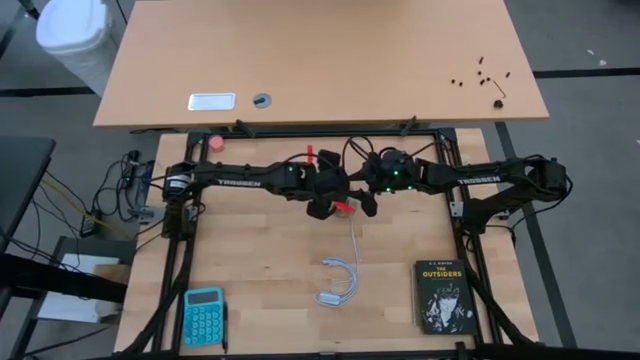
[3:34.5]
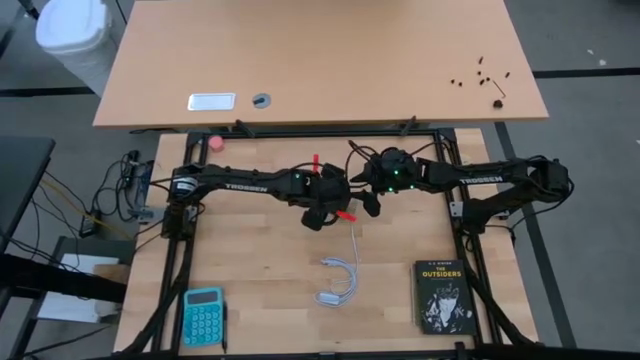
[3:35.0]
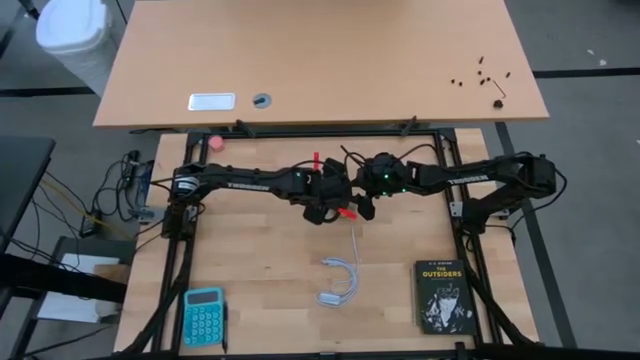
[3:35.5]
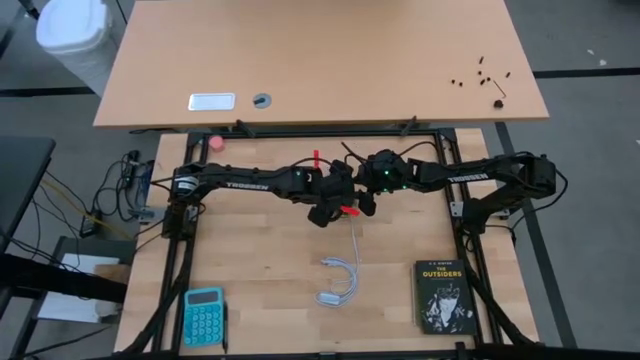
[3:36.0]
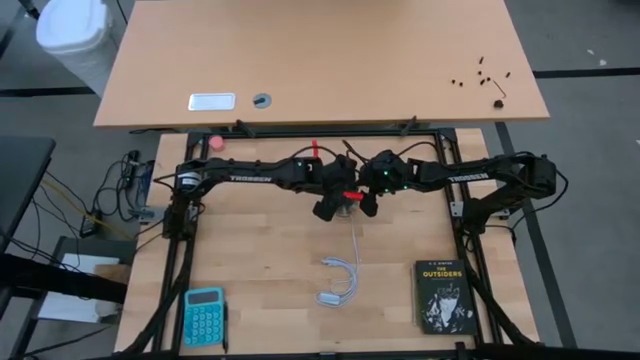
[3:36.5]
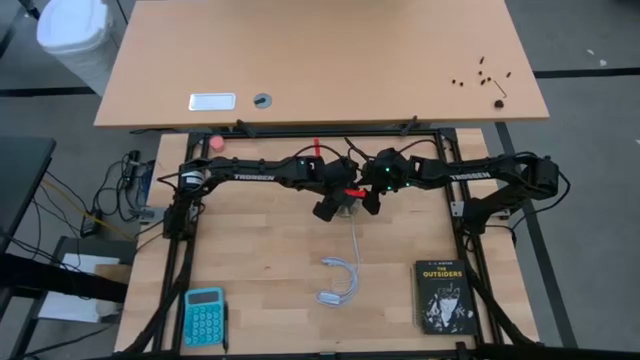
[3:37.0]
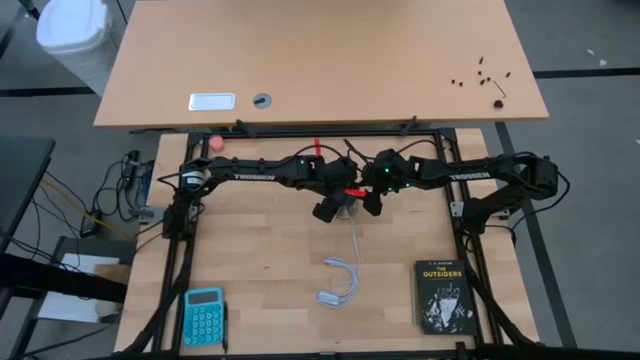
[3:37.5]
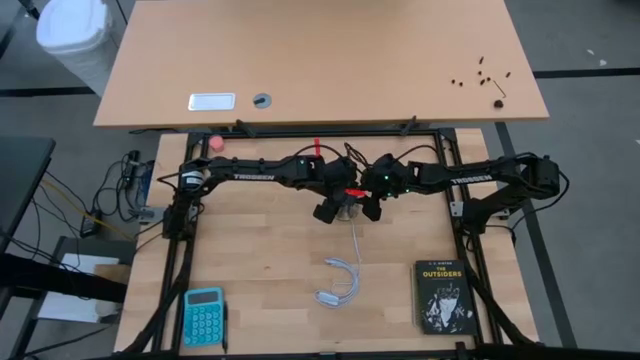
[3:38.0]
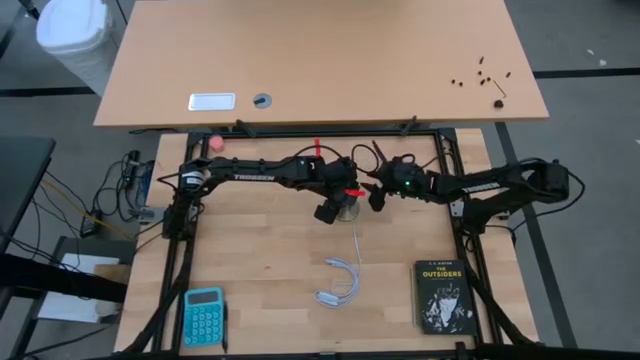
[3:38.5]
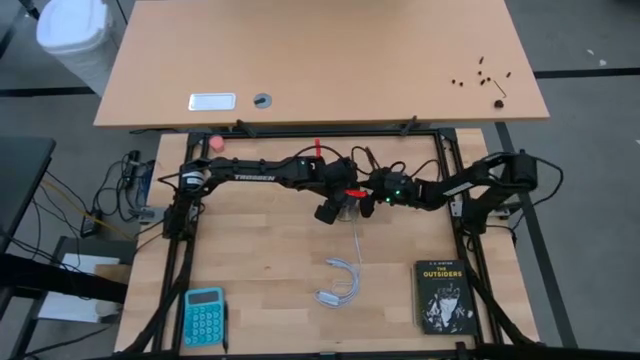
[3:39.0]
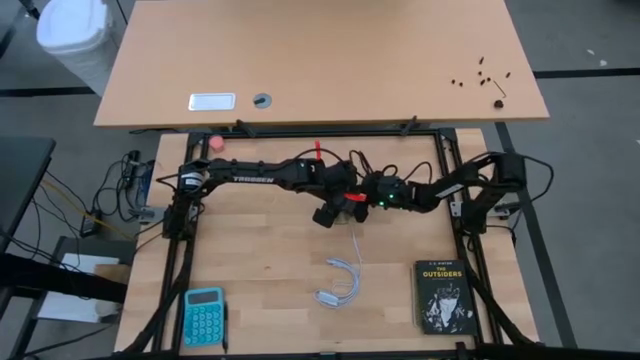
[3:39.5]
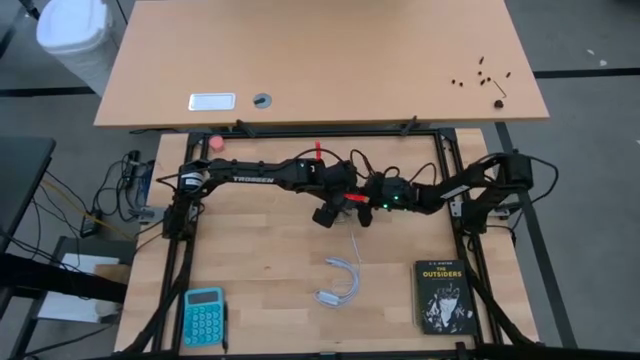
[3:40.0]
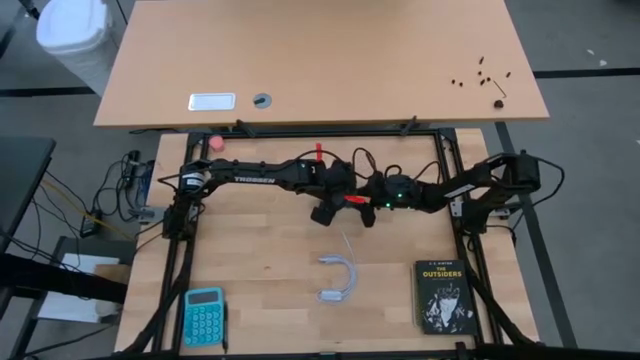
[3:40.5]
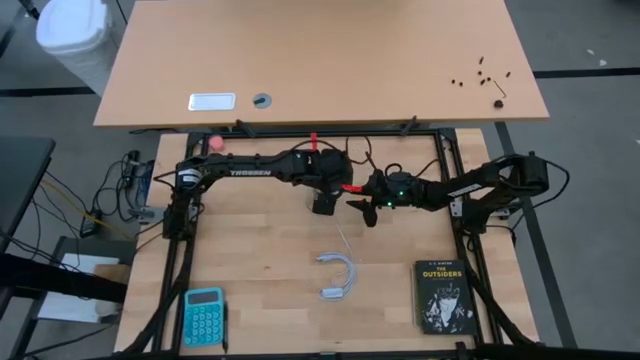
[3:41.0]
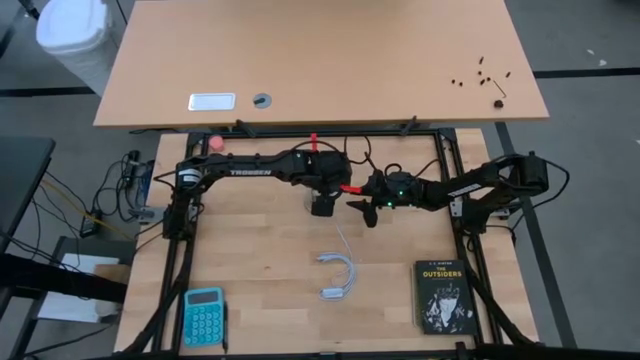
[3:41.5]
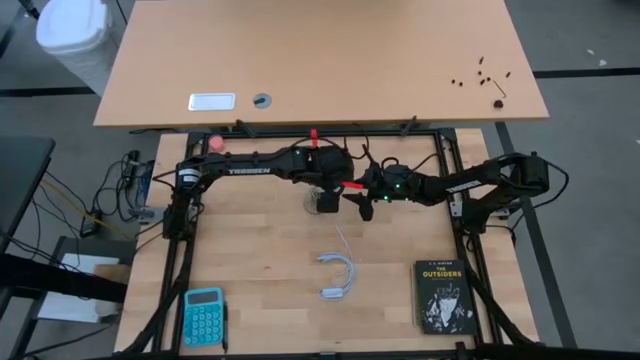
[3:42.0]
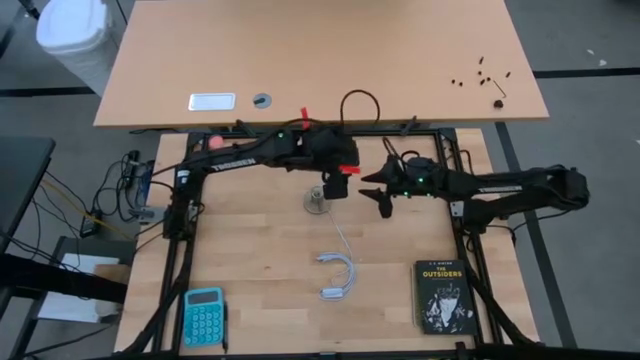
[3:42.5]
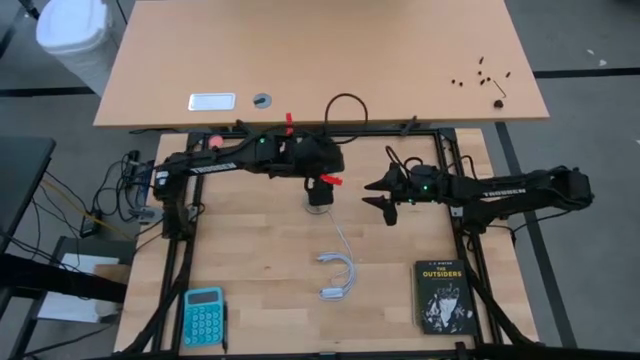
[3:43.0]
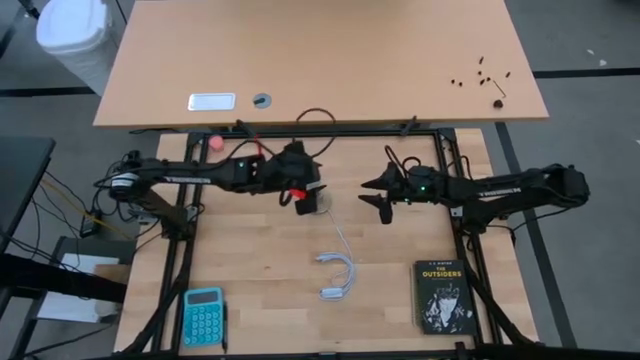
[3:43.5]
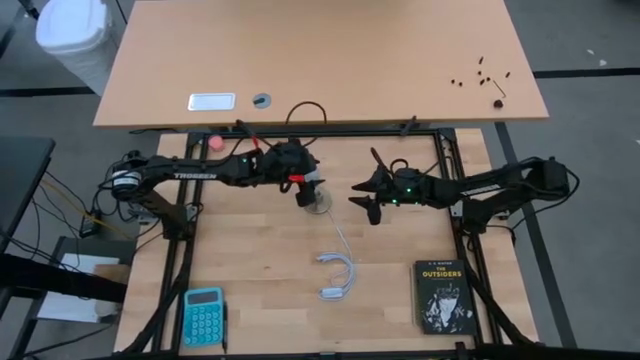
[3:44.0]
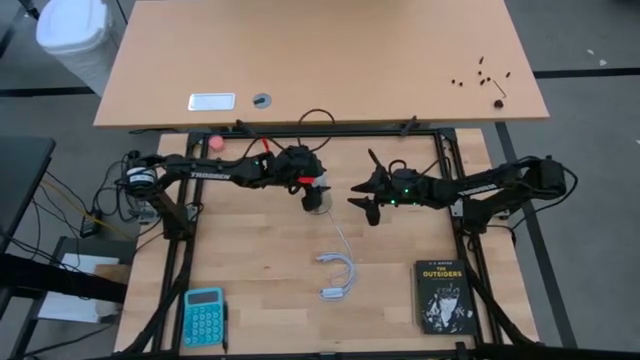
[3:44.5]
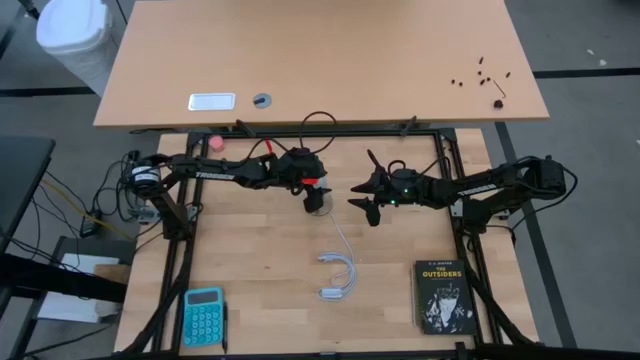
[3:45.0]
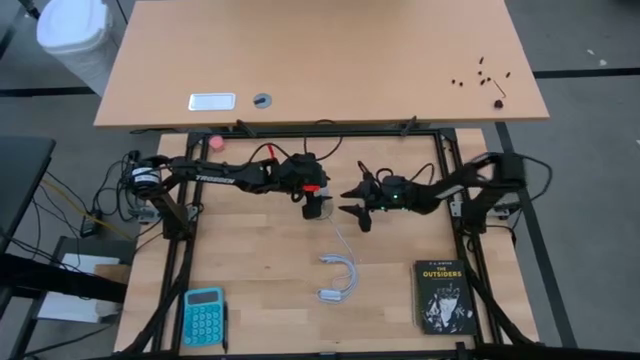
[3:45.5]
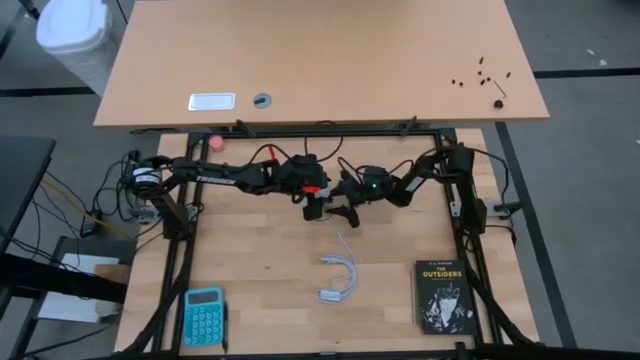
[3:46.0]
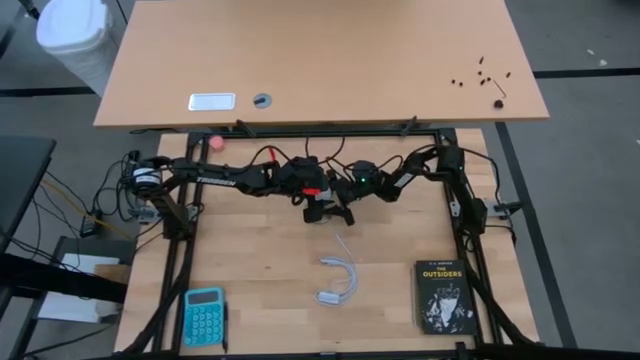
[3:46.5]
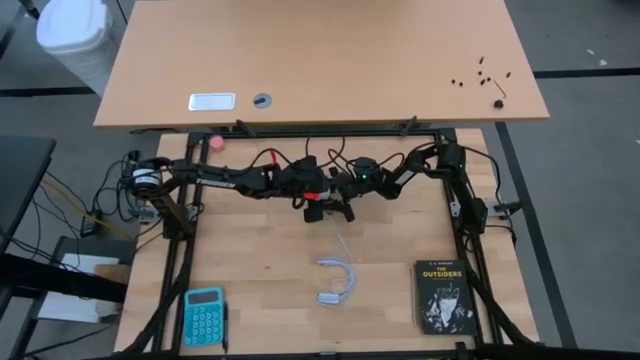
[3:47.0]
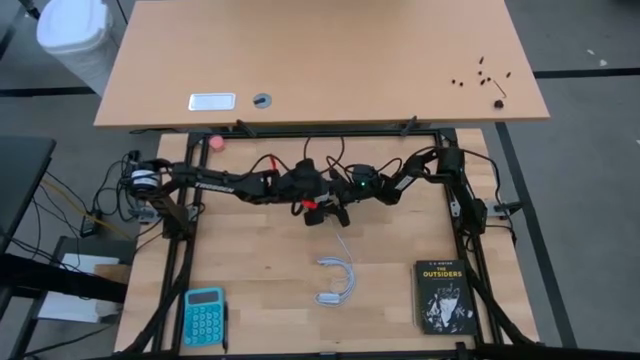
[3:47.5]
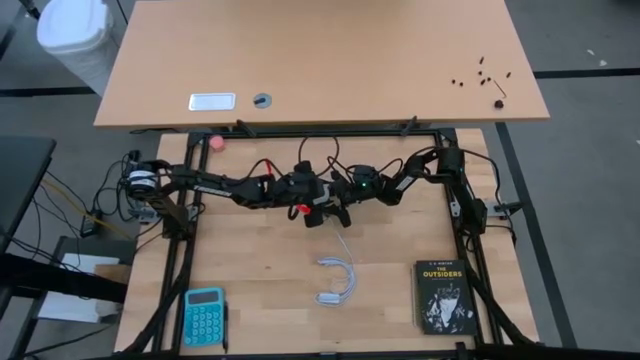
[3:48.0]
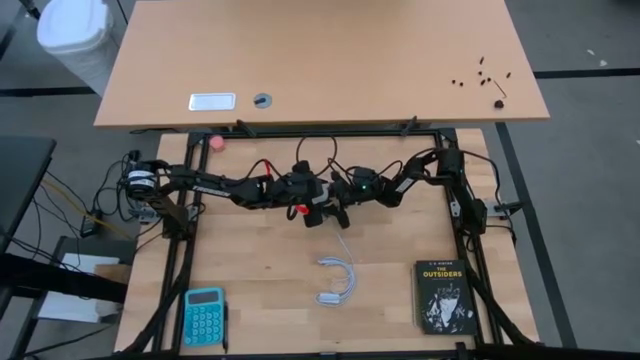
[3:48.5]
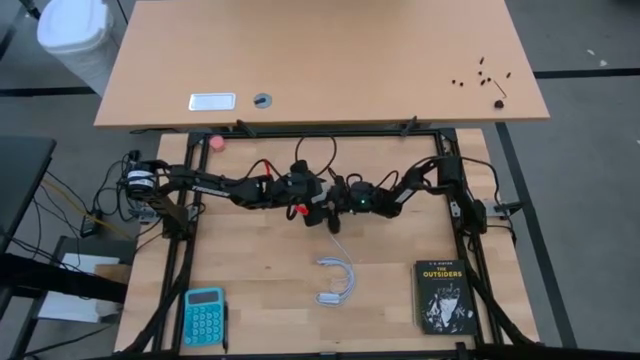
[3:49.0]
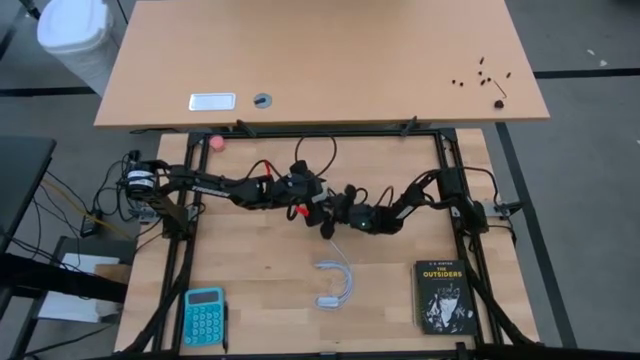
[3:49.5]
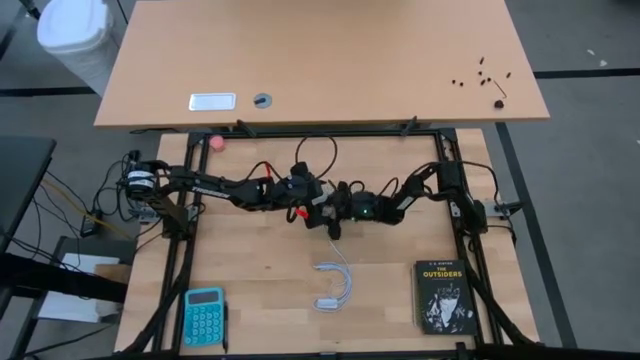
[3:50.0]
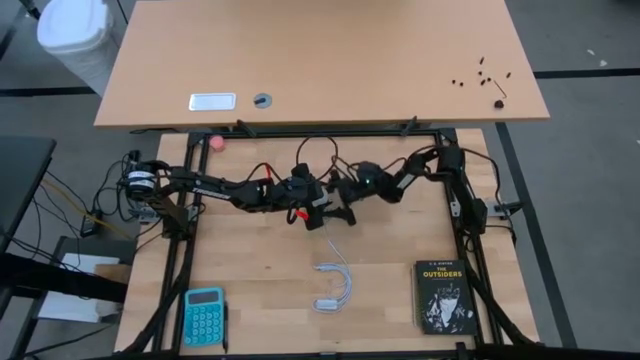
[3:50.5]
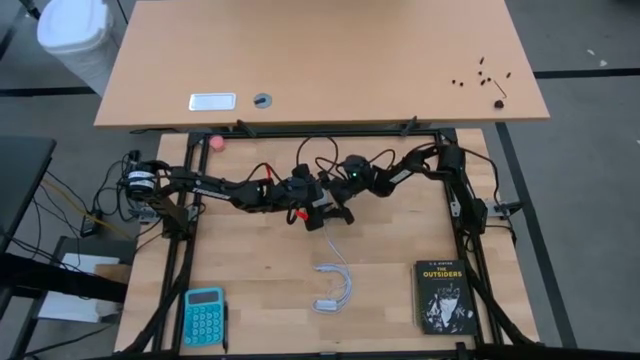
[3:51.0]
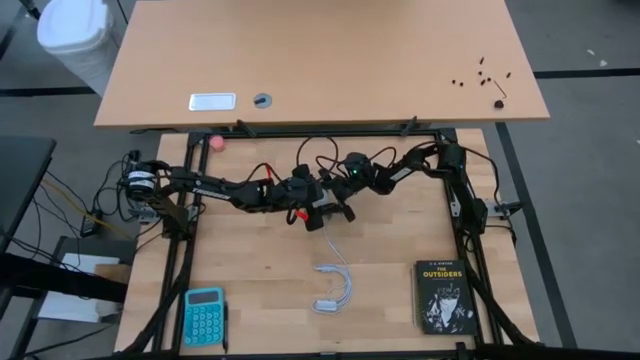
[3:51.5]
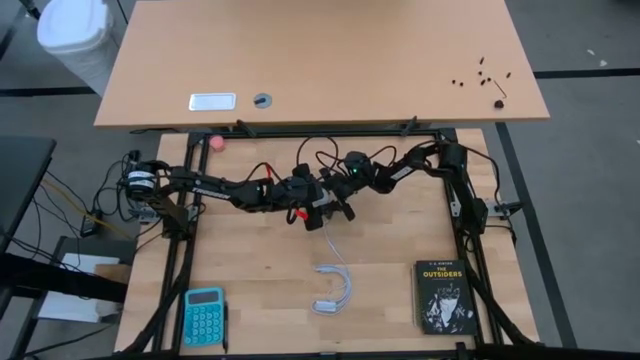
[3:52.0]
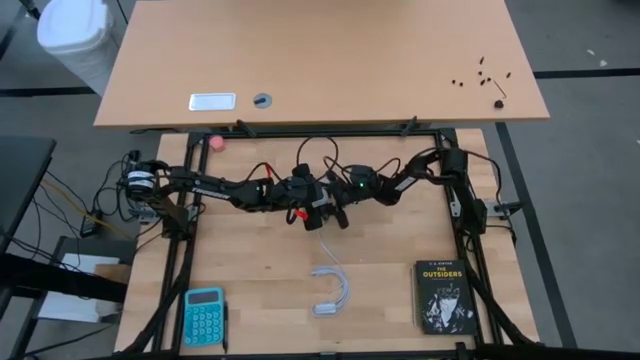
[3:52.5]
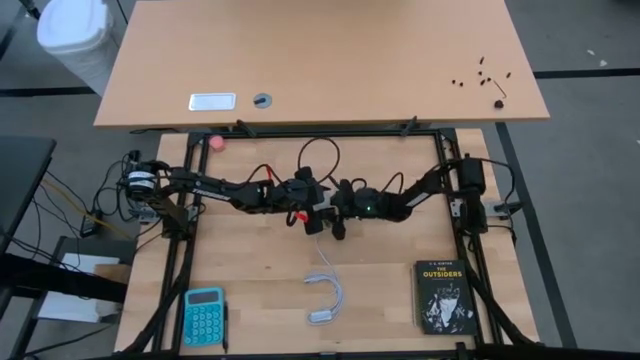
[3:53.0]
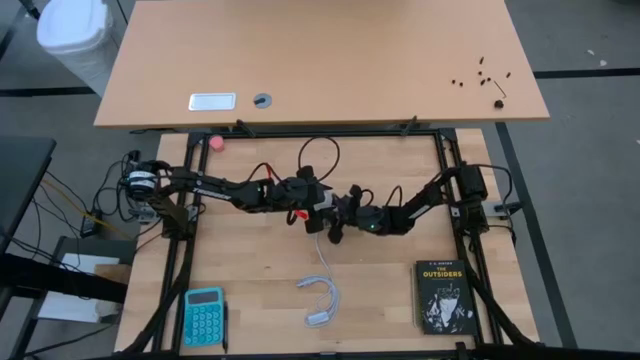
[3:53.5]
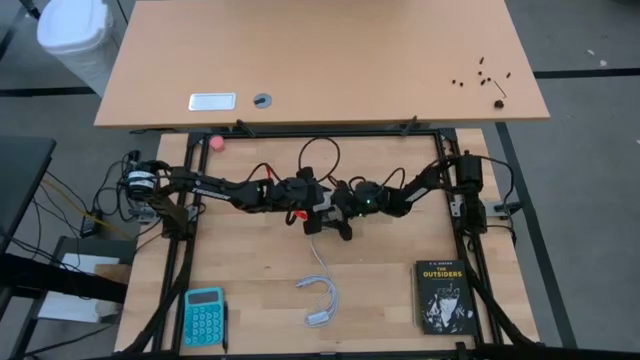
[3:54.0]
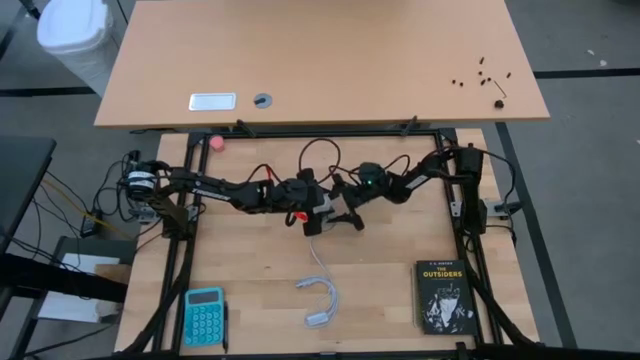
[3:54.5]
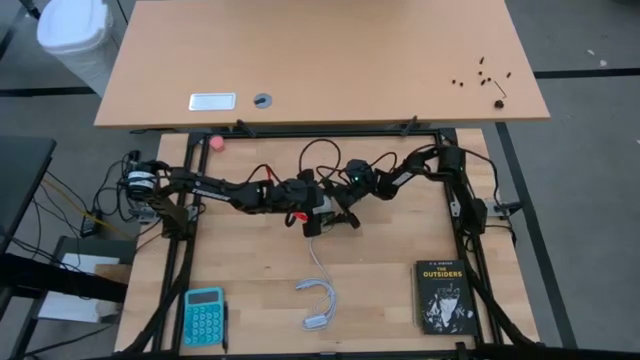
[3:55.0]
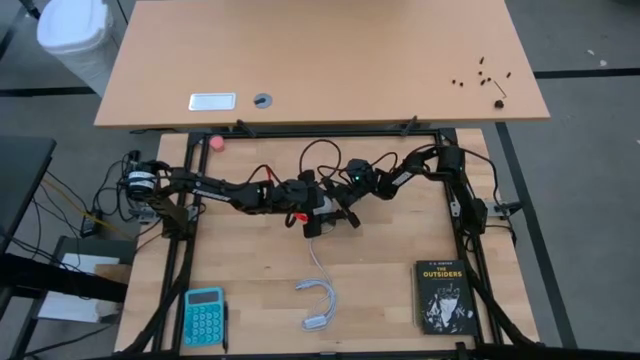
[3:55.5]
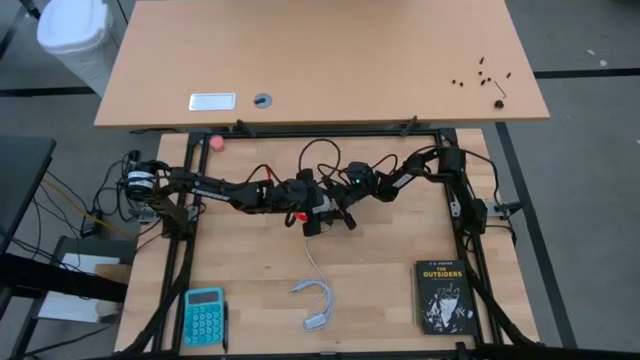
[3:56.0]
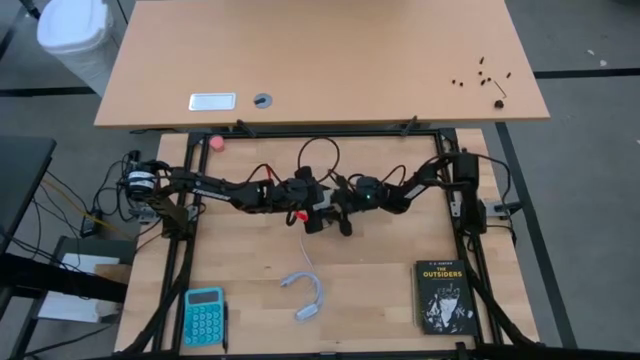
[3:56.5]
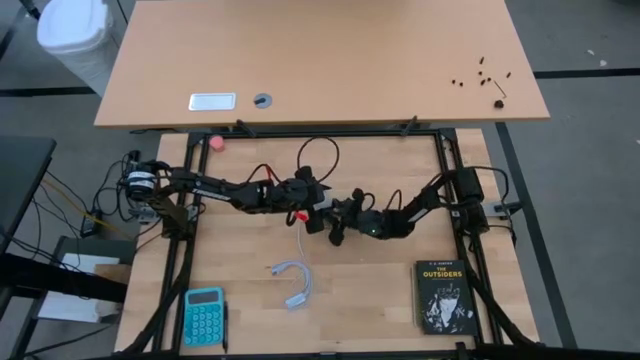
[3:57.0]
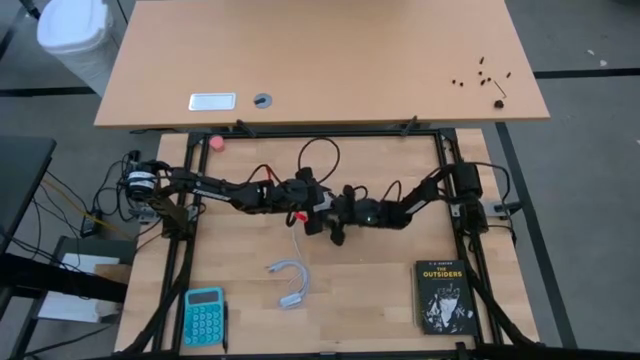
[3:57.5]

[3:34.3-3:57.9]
Task: Screw lightbulb
Insert the white lightbulb into the silver lamp
